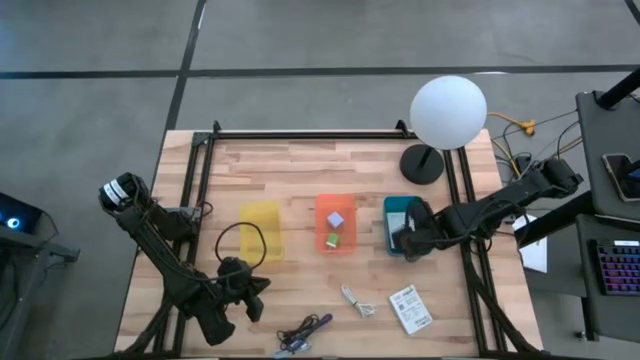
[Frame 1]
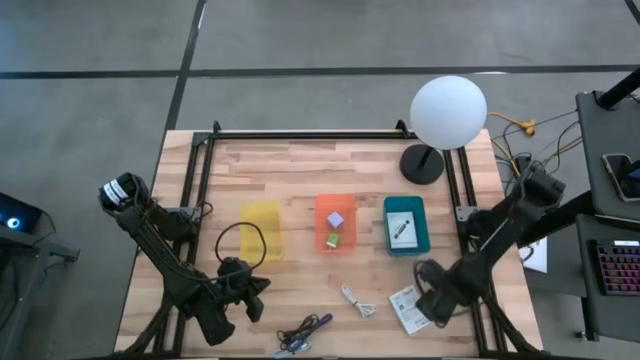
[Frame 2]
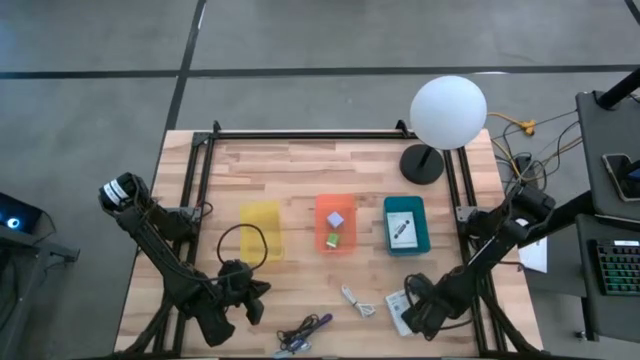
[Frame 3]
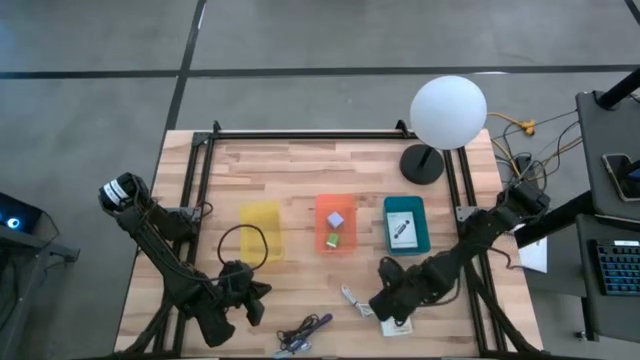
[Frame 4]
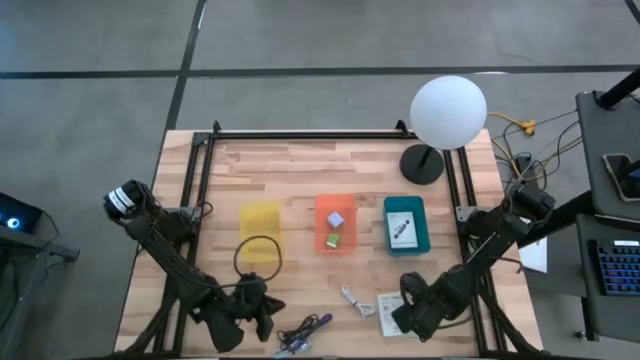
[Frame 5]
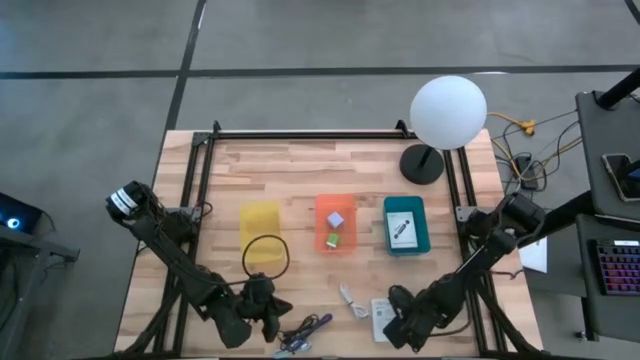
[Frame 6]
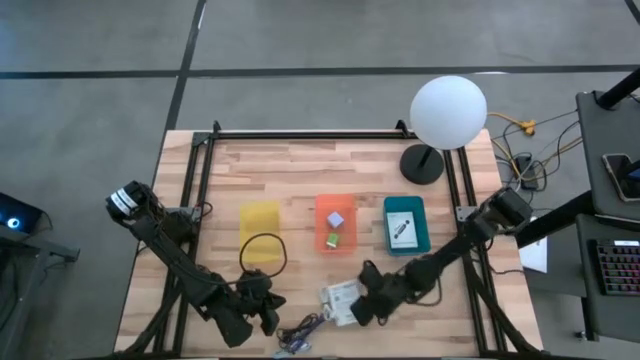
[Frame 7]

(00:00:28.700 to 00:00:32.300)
Task: Pick and place items into bin
Adjust the white card reader box

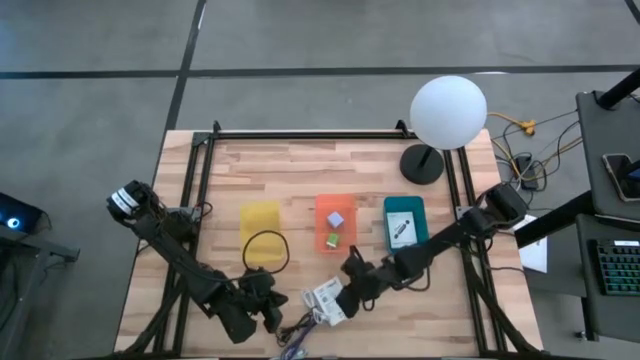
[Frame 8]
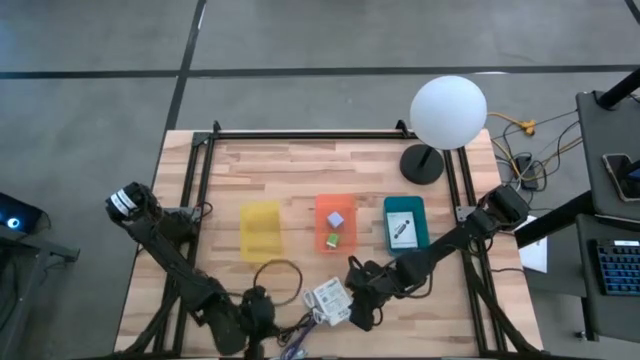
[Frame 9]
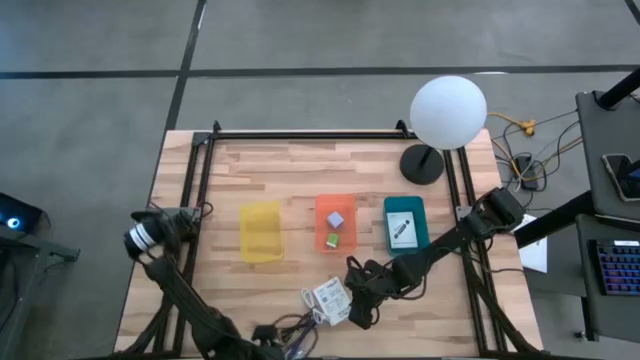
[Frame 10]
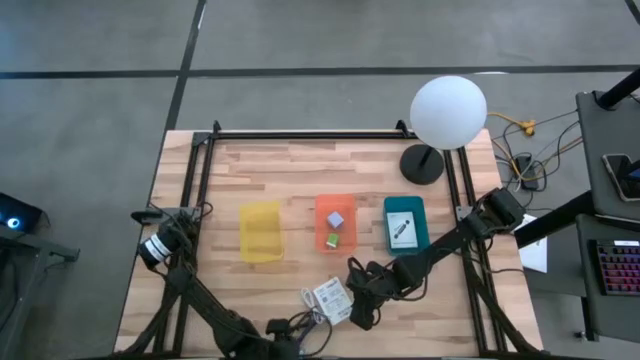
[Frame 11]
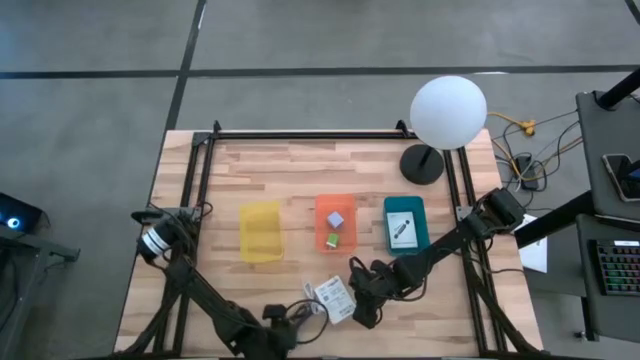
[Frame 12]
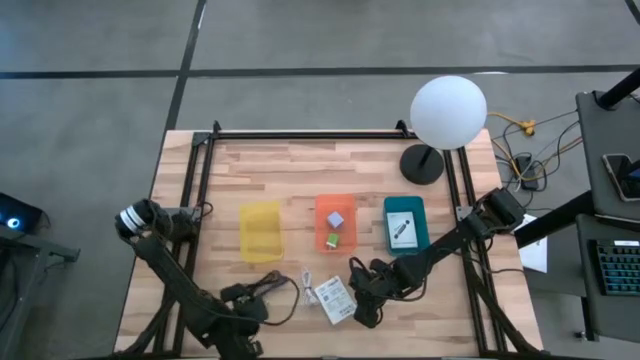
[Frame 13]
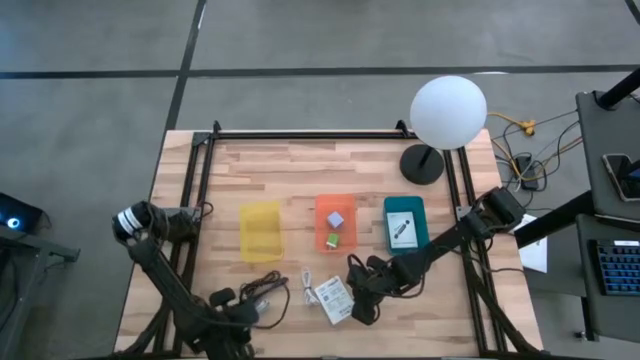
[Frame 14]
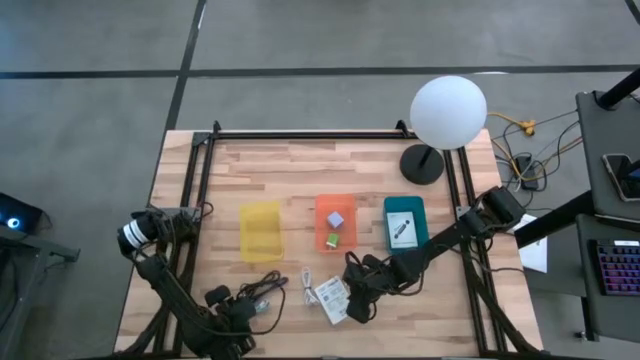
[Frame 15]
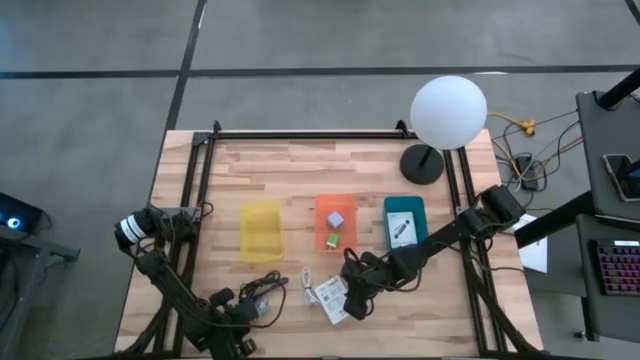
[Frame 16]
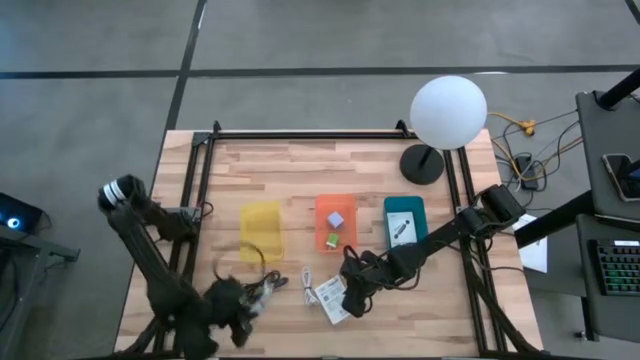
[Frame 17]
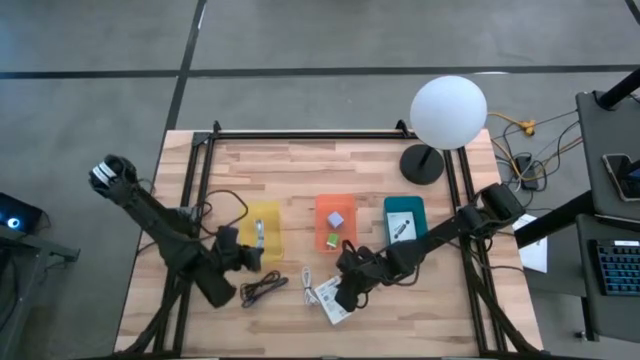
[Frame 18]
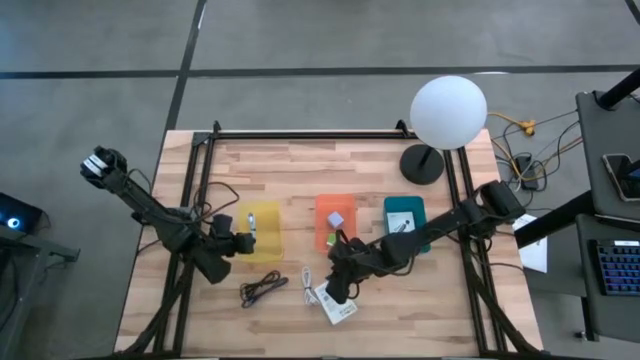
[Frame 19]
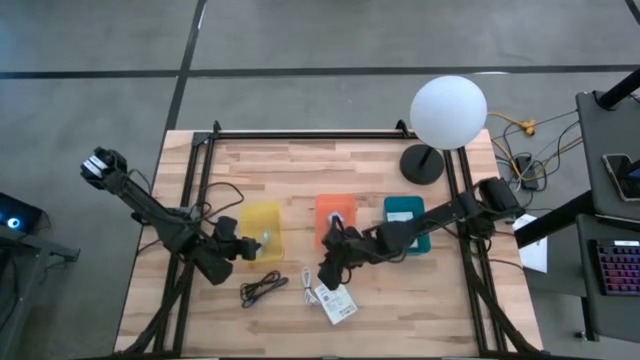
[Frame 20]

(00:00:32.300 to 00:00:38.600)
Put the left light blue USB cable into the yellow bin

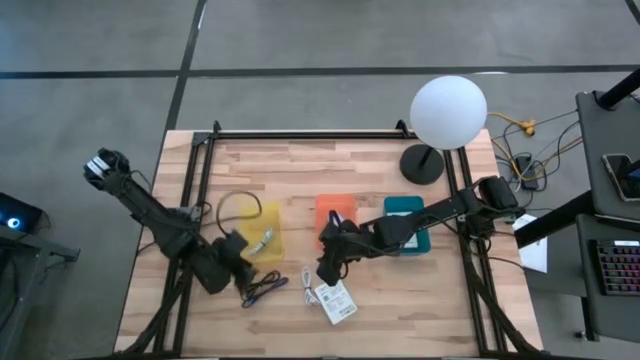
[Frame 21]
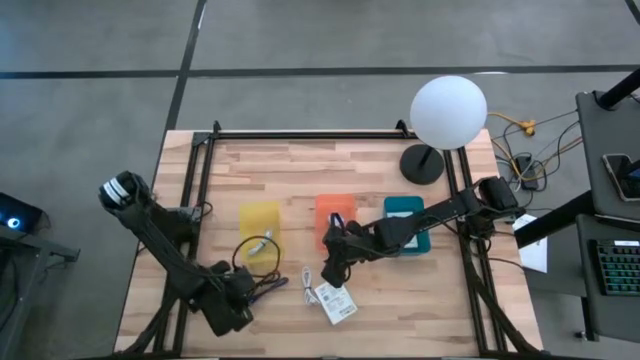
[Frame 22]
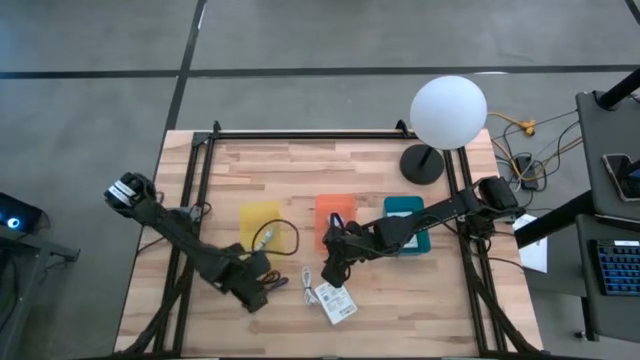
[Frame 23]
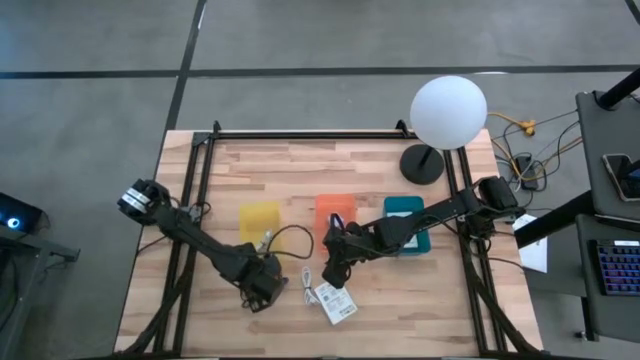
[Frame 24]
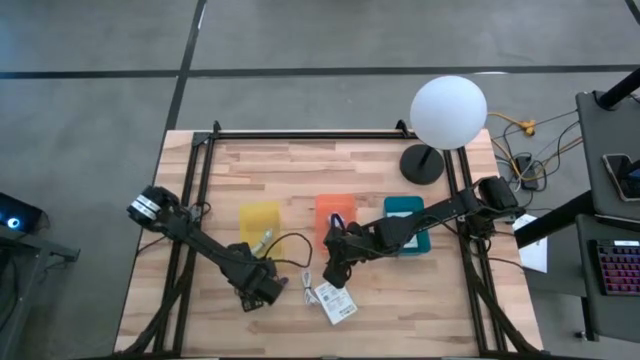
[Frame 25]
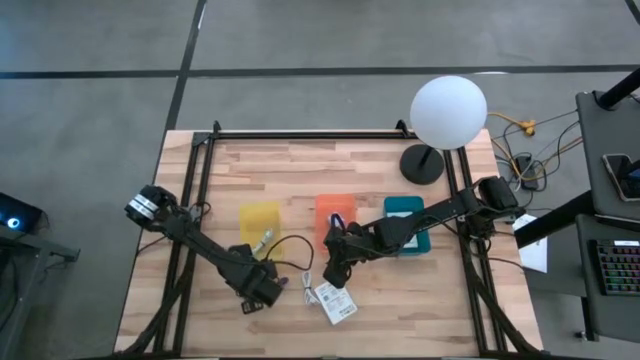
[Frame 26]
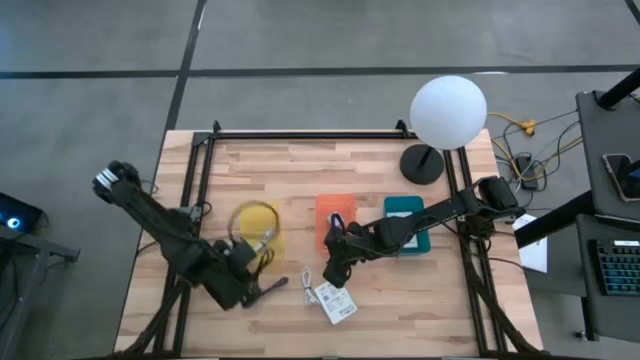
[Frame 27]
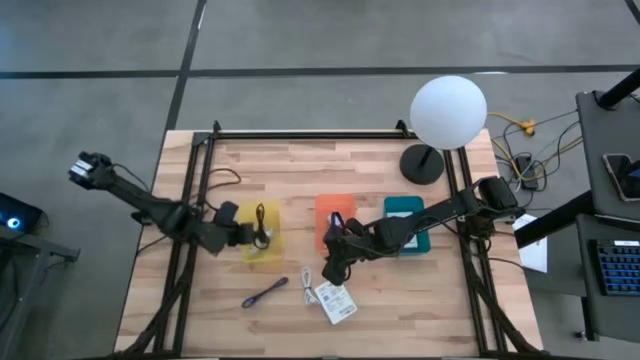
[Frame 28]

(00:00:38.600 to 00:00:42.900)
Put the black USB cable into the yellow bin

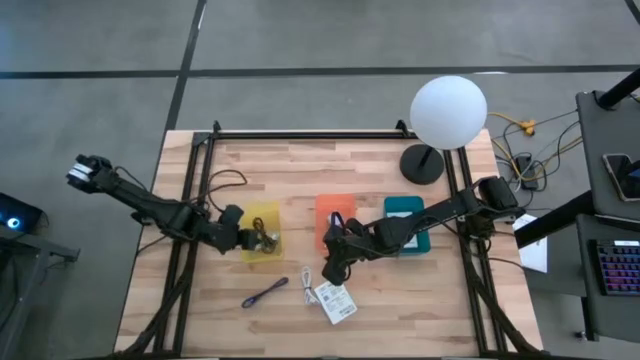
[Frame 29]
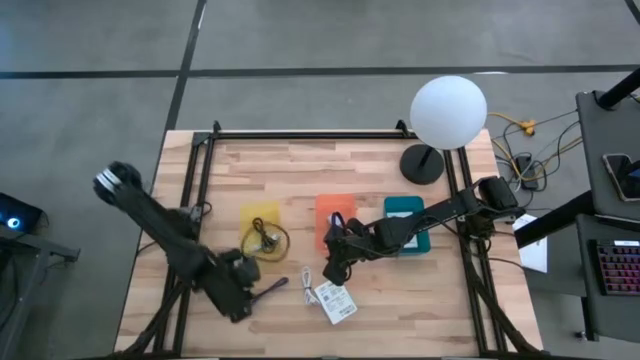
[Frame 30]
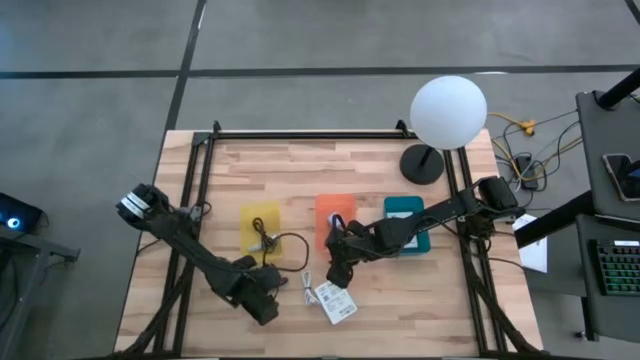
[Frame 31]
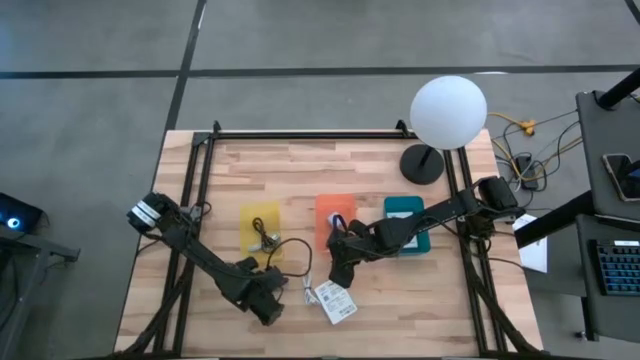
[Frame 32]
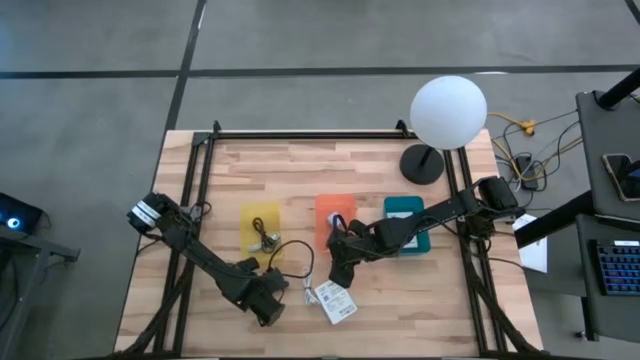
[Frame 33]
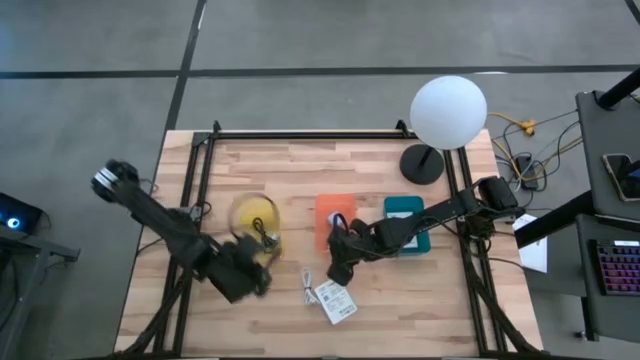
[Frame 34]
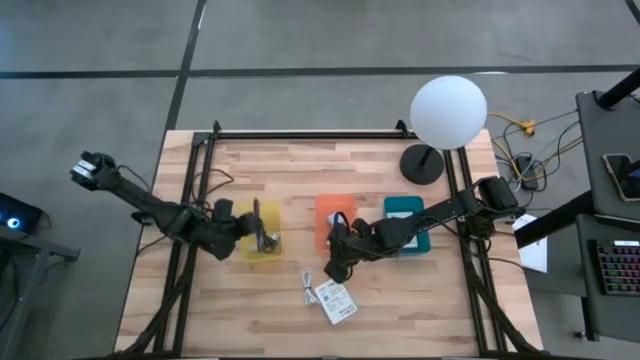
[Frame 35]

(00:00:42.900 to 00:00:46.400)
Put the dark blue USB cable into the yellow bin

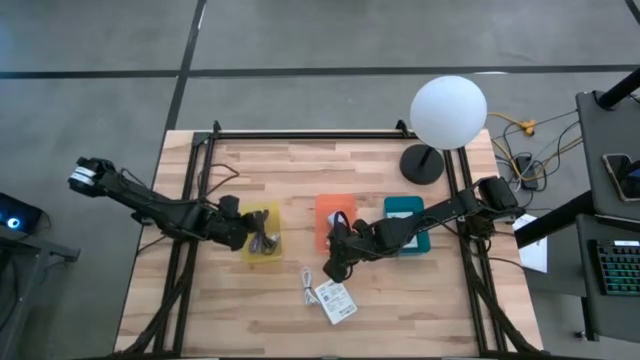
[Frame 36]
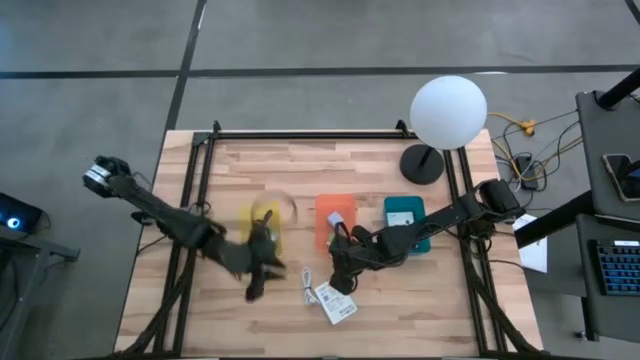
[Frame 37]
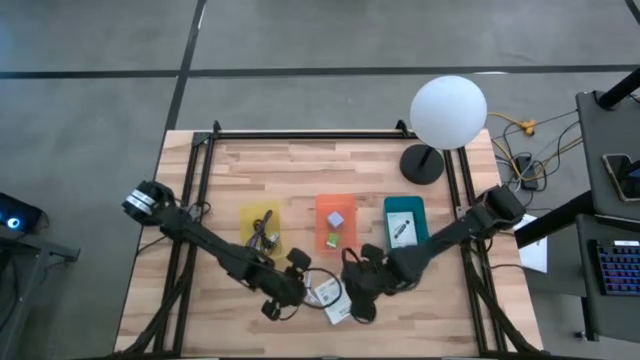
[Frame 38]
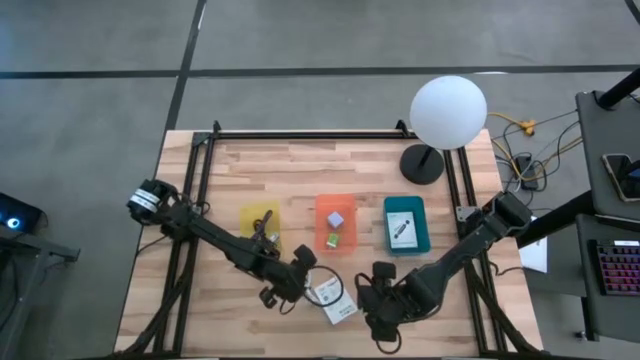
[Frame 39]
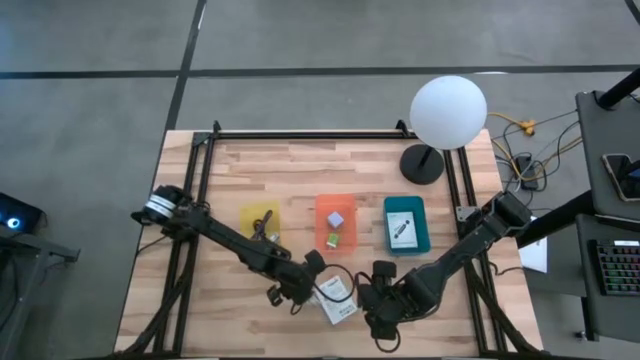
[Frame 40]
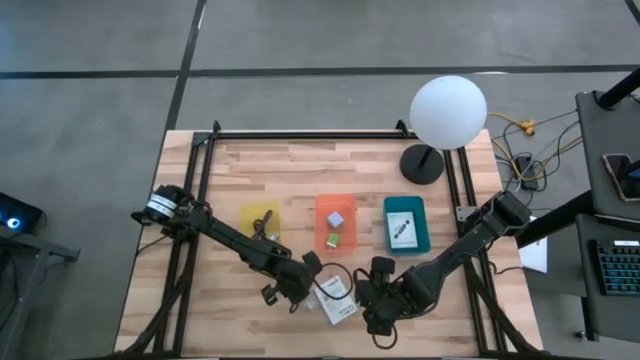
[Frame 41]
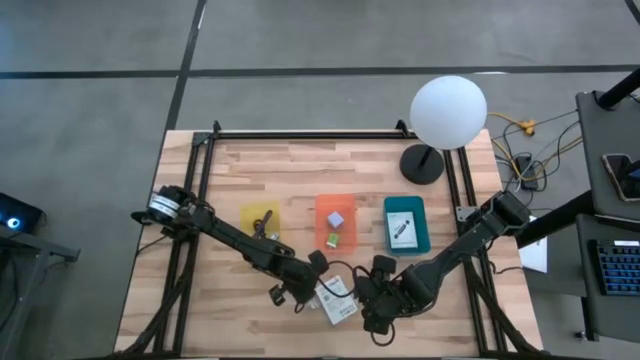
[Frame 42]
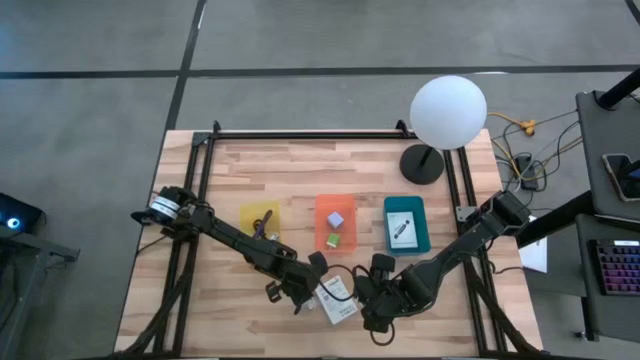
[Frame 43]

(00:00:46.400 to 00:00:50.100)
Put the white USB cable into the yellow bin

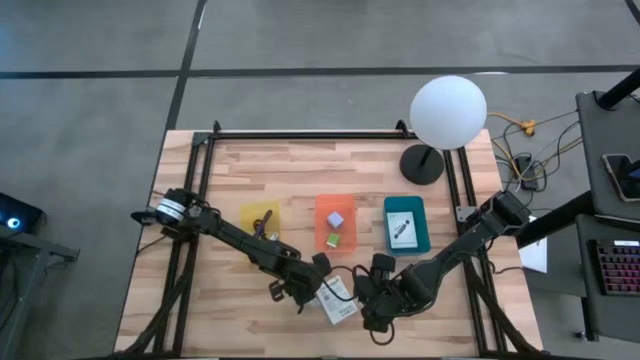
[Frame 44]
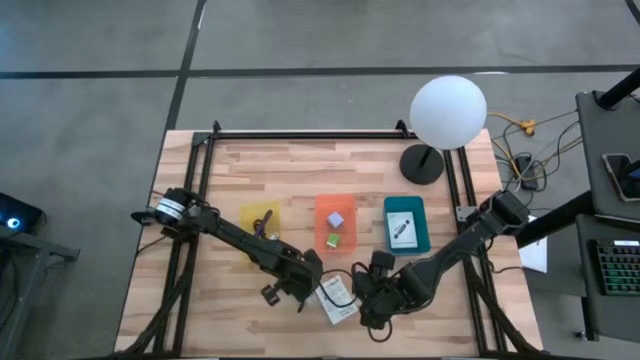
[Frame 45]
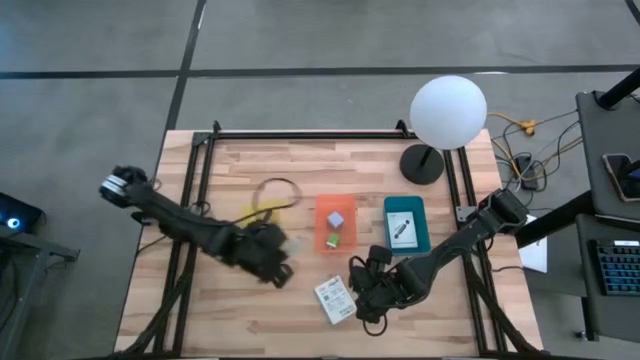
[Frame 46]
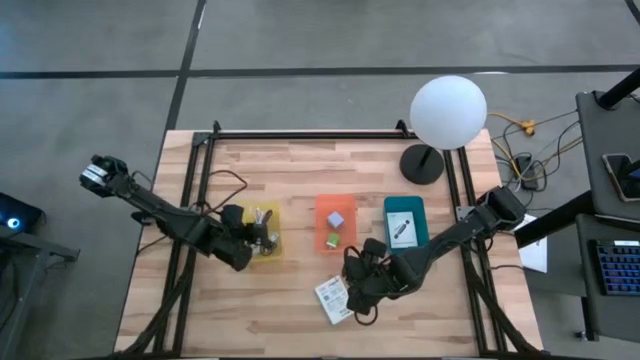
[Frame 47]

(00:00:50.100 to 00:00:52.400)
Put the white USB cable into the yellow bin
